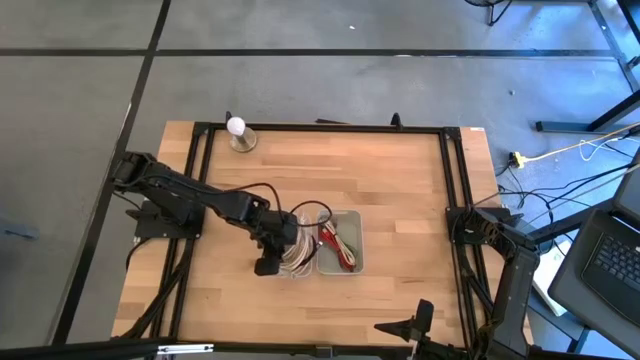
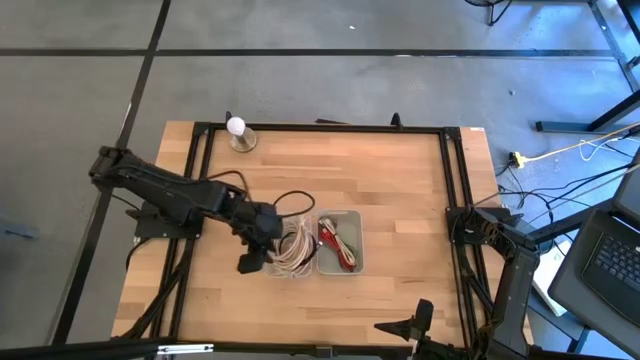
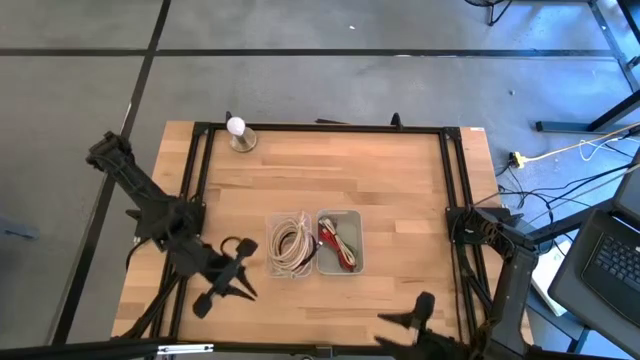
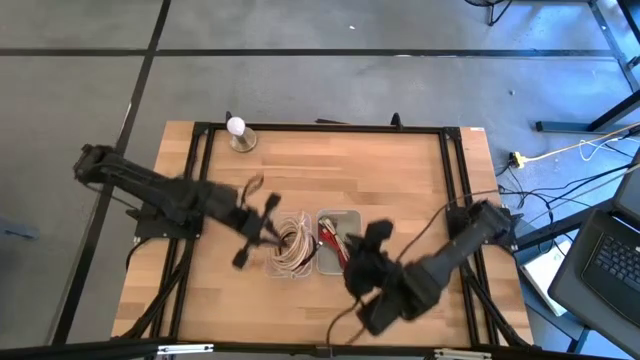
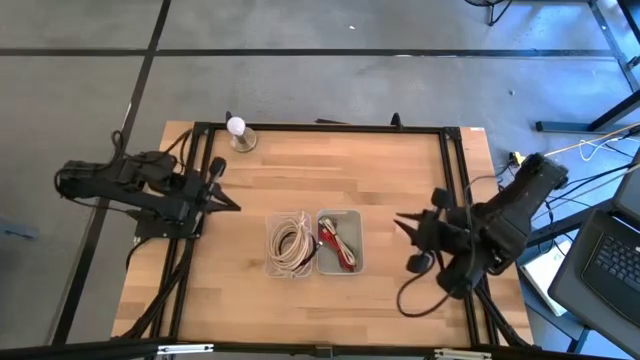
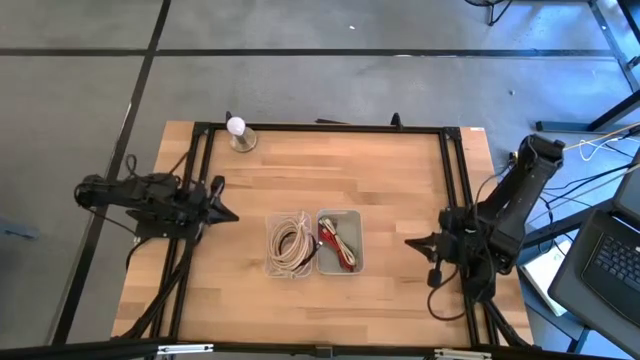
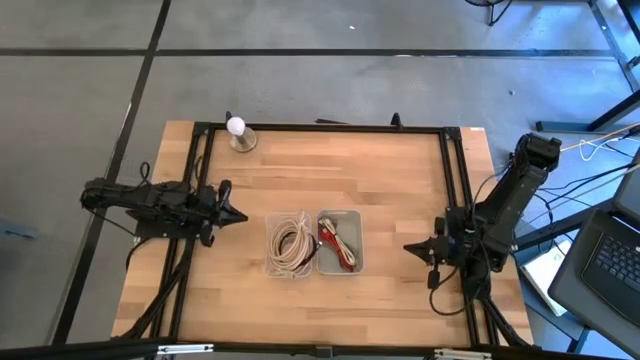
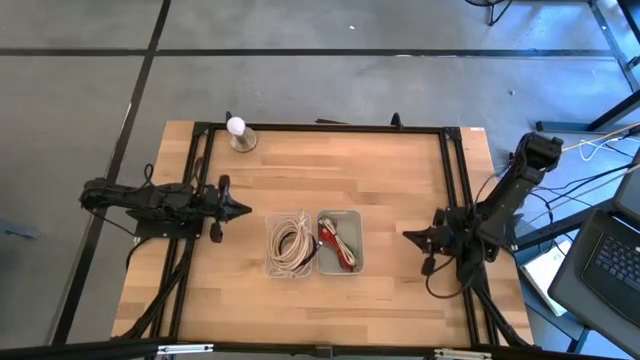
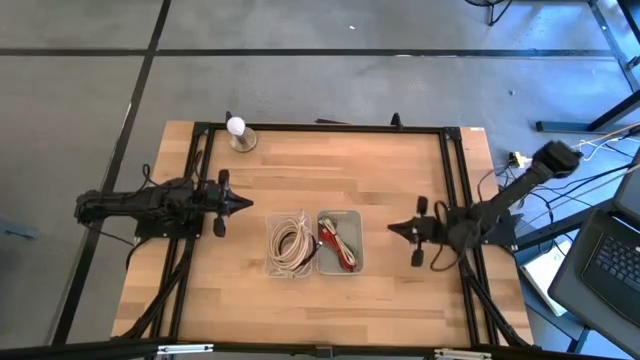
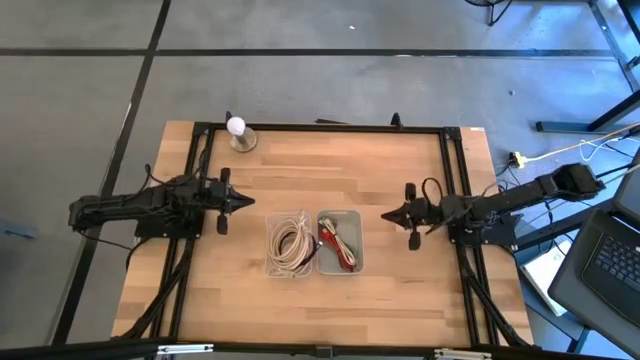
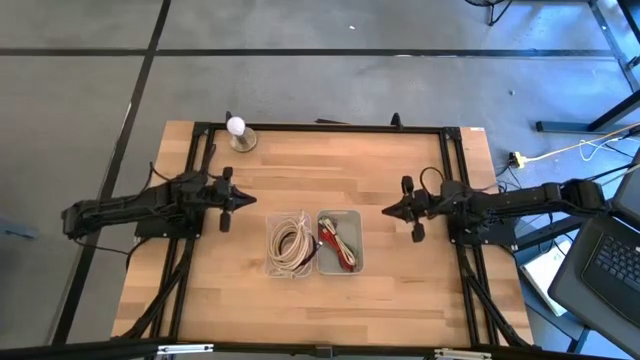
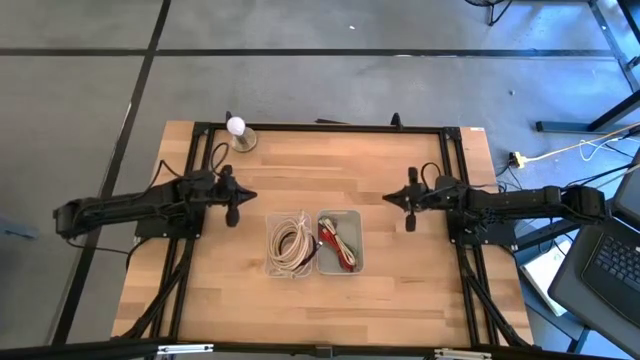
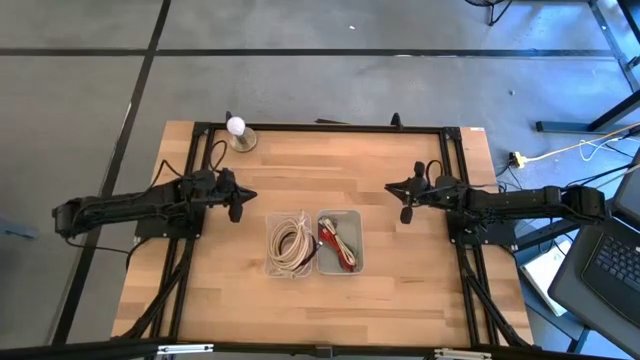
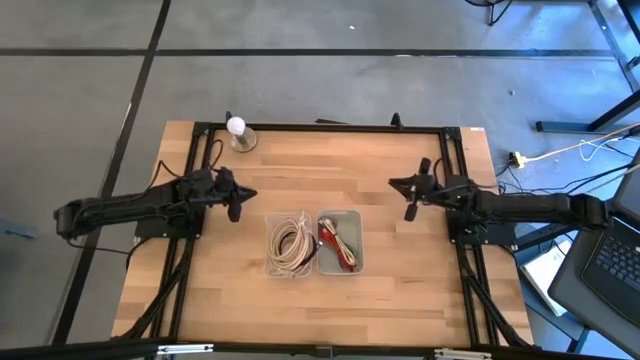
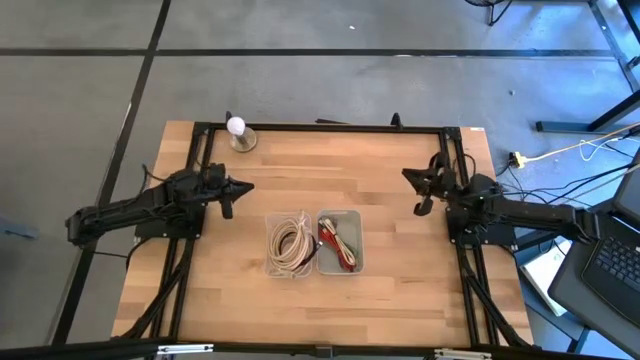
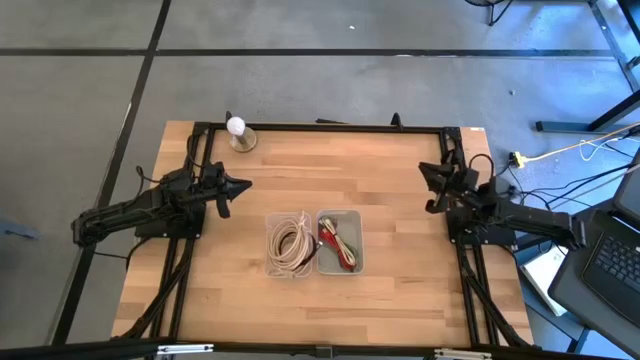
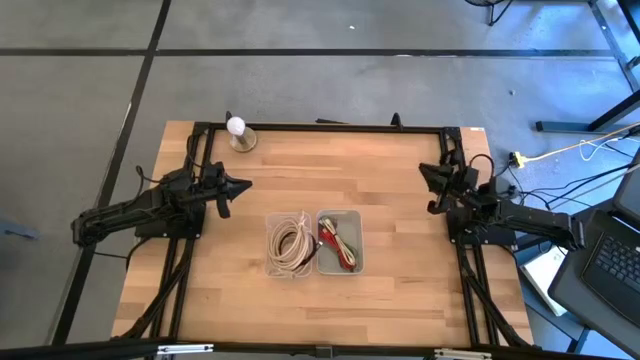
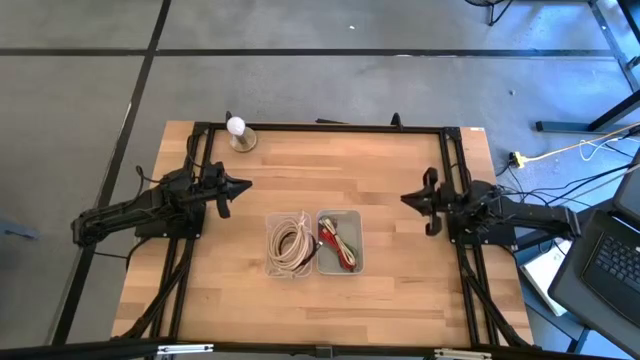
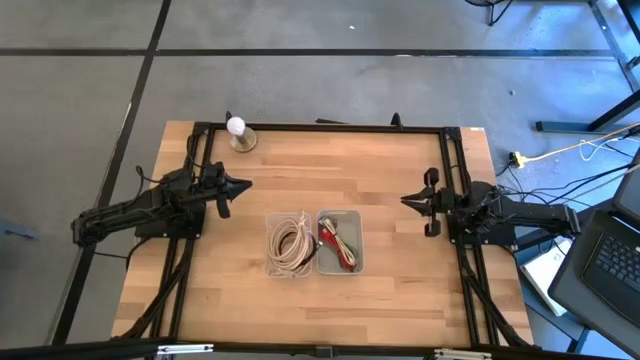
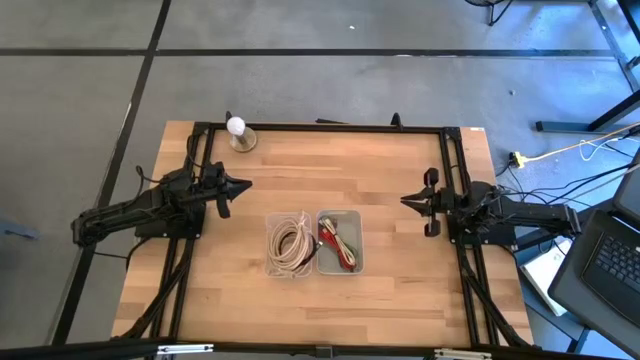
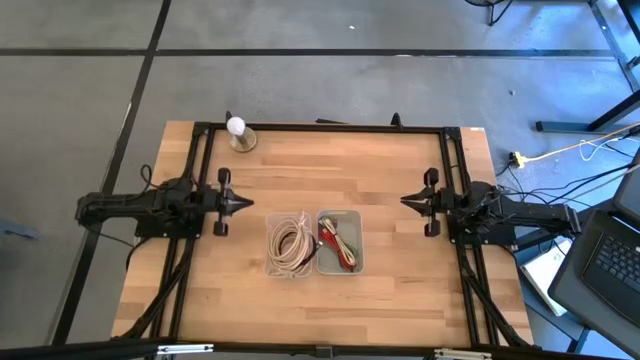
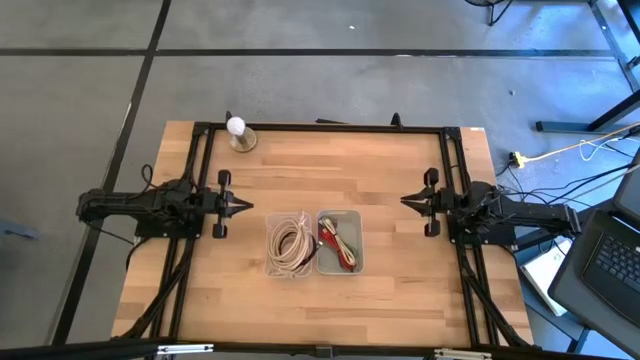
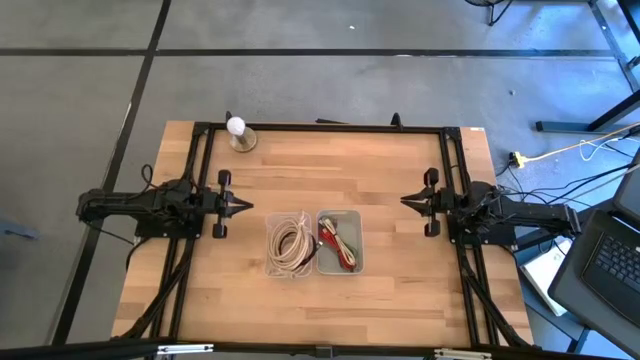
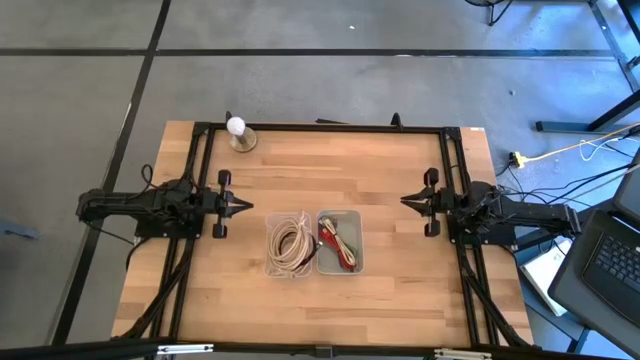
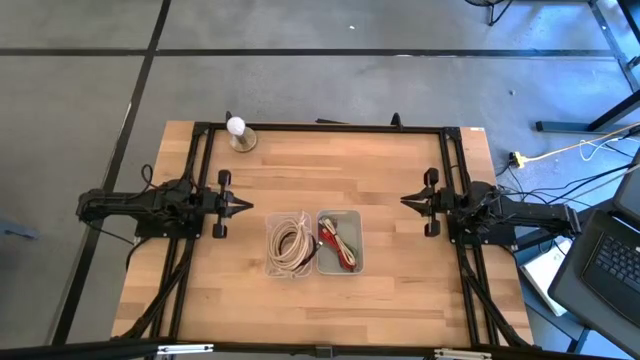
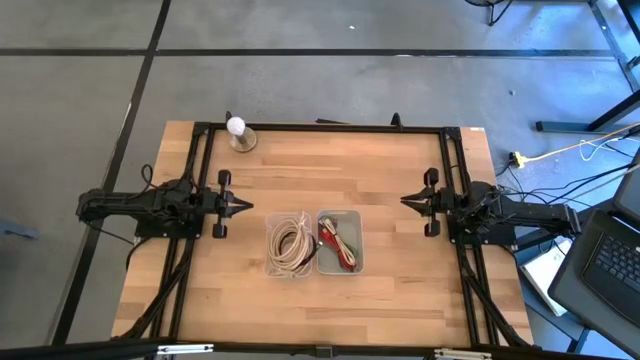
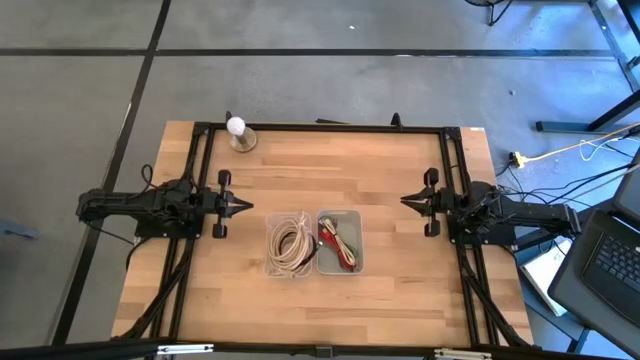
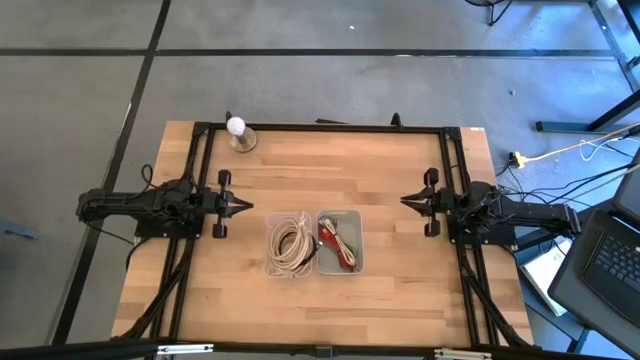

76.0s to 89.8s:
Return to Home Position
